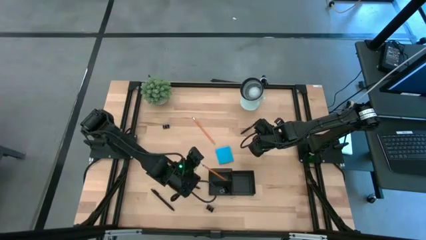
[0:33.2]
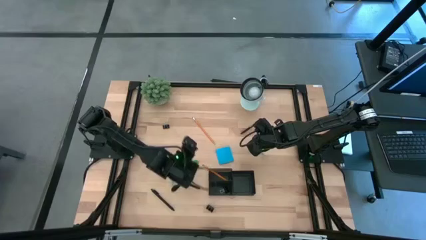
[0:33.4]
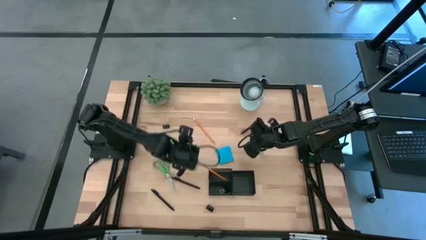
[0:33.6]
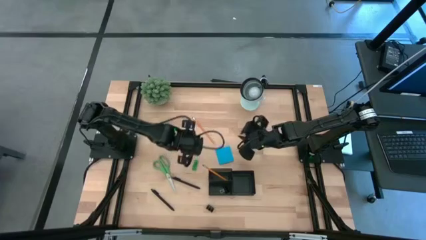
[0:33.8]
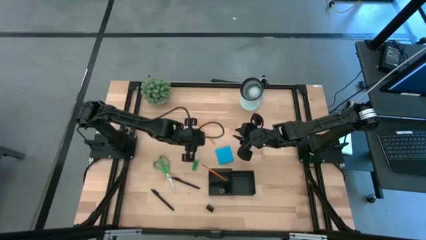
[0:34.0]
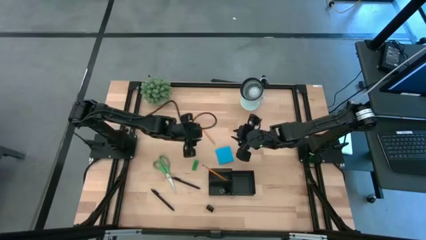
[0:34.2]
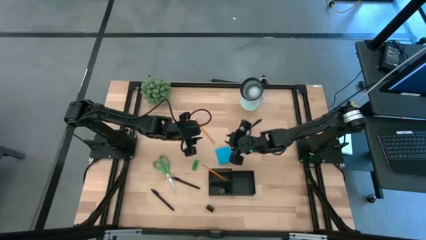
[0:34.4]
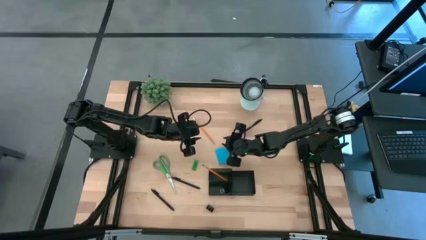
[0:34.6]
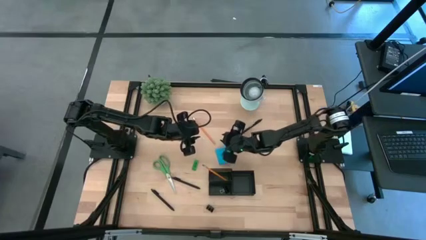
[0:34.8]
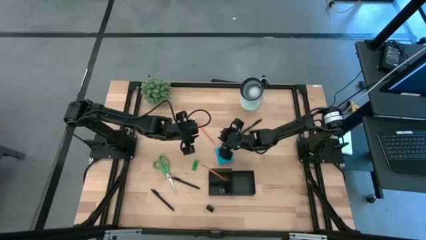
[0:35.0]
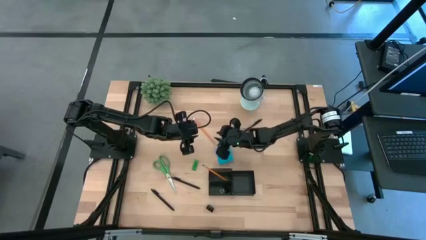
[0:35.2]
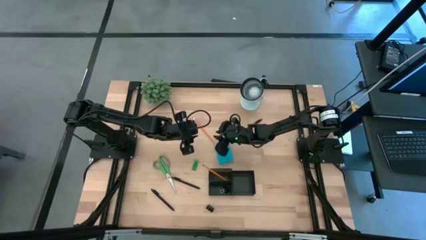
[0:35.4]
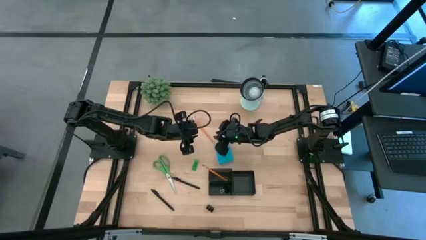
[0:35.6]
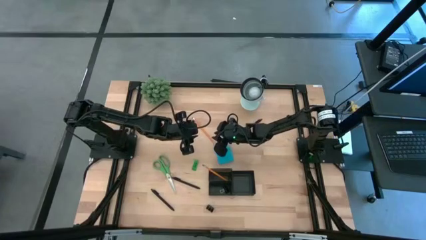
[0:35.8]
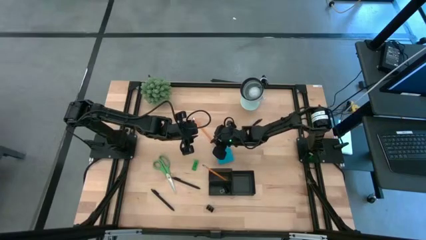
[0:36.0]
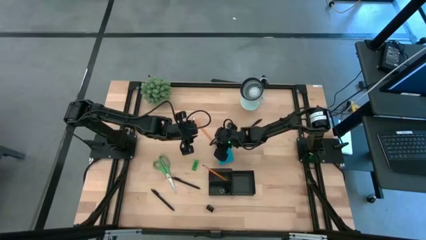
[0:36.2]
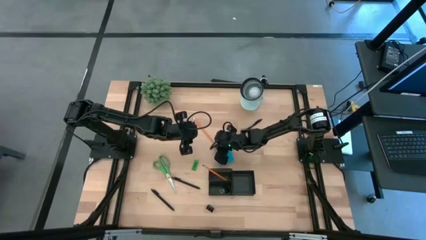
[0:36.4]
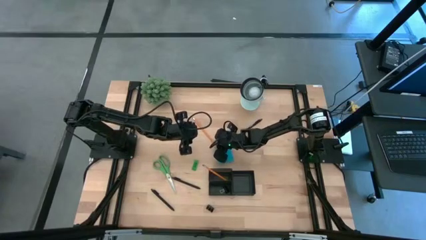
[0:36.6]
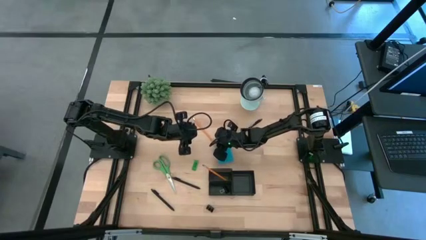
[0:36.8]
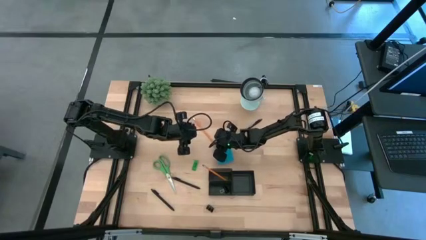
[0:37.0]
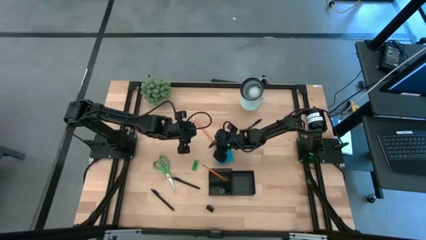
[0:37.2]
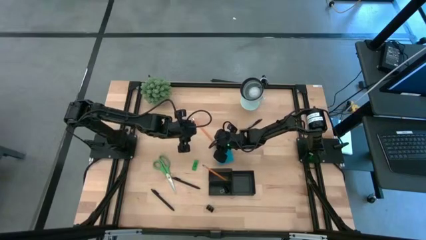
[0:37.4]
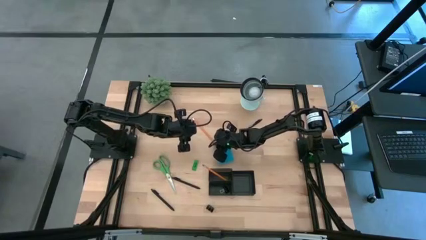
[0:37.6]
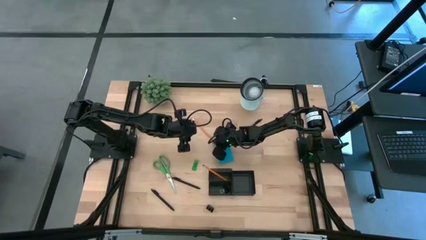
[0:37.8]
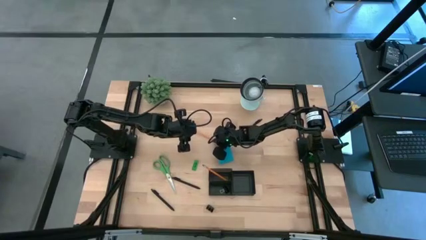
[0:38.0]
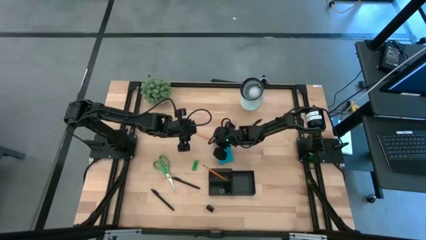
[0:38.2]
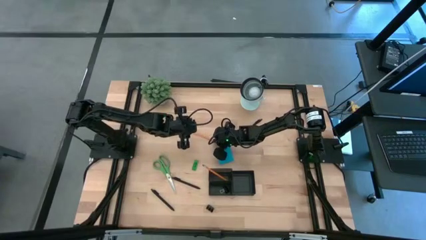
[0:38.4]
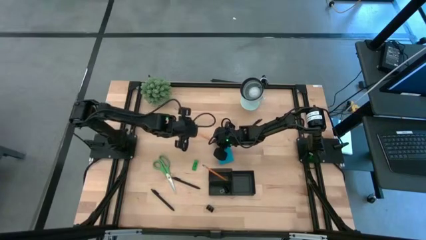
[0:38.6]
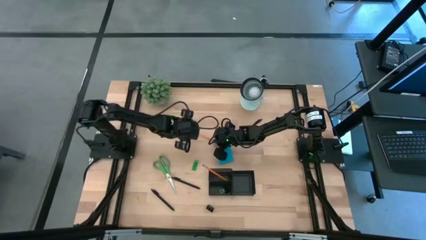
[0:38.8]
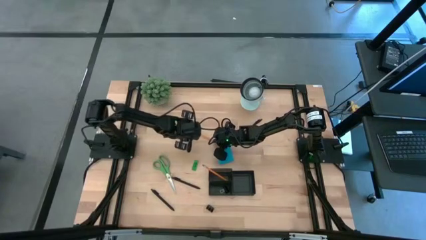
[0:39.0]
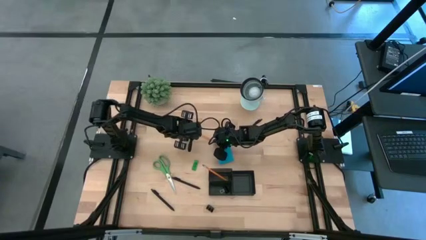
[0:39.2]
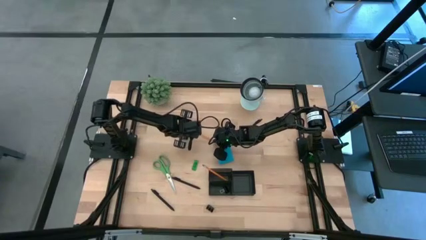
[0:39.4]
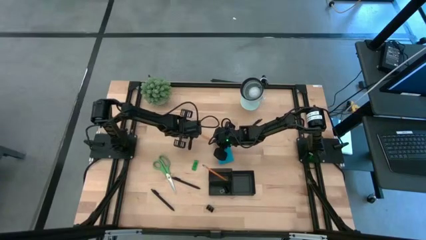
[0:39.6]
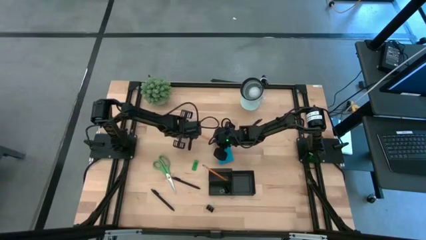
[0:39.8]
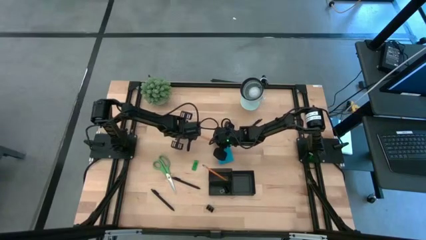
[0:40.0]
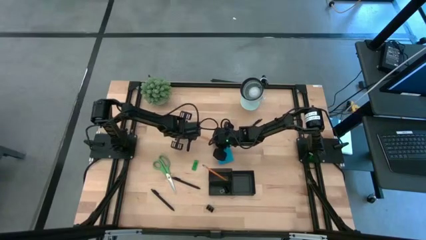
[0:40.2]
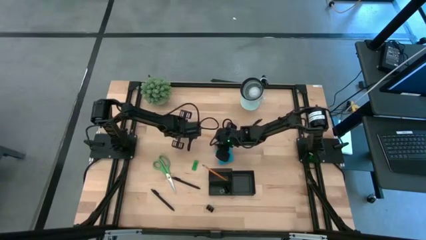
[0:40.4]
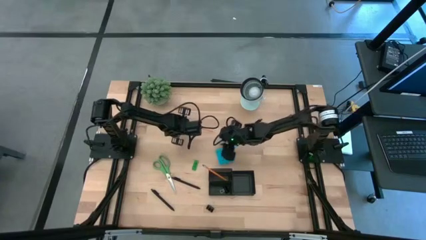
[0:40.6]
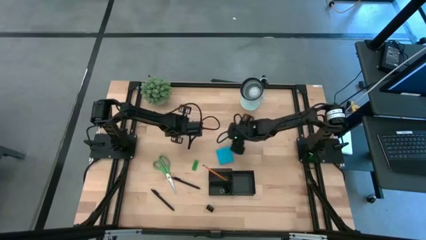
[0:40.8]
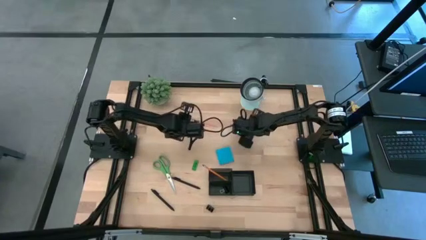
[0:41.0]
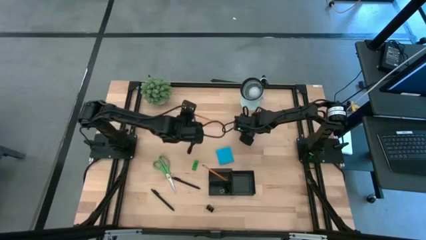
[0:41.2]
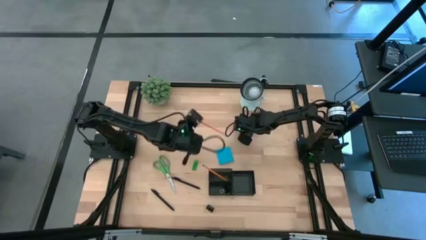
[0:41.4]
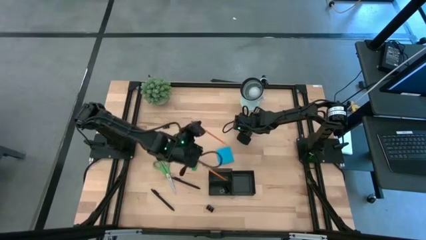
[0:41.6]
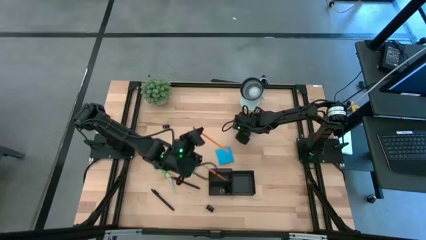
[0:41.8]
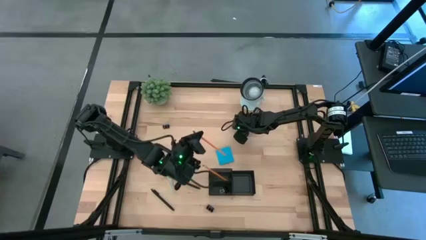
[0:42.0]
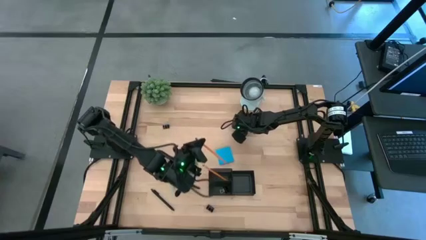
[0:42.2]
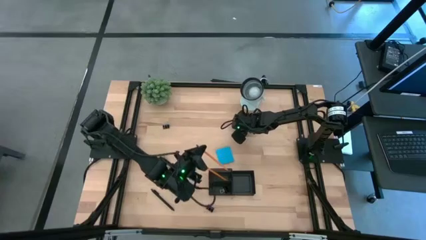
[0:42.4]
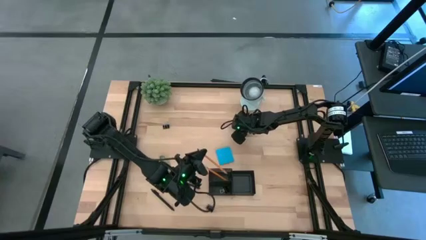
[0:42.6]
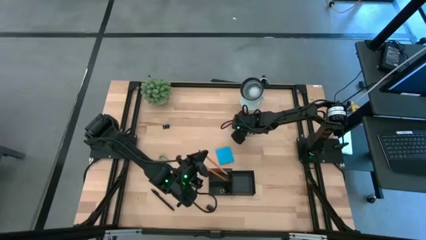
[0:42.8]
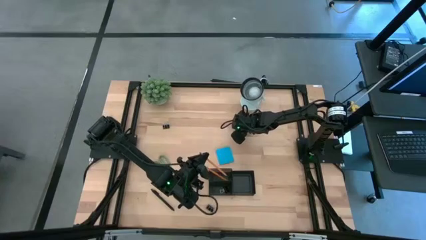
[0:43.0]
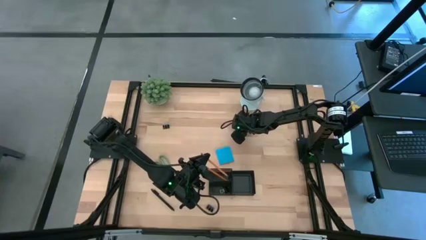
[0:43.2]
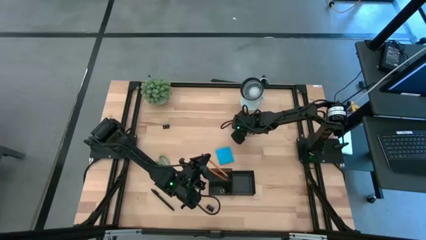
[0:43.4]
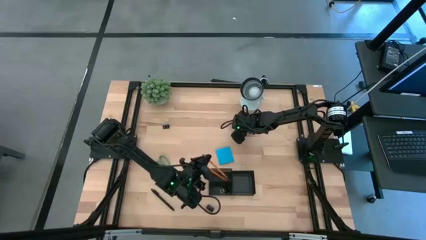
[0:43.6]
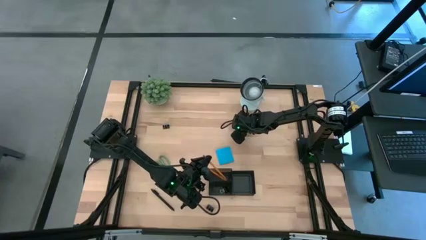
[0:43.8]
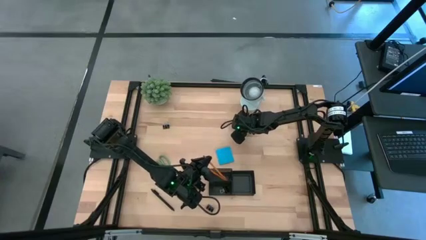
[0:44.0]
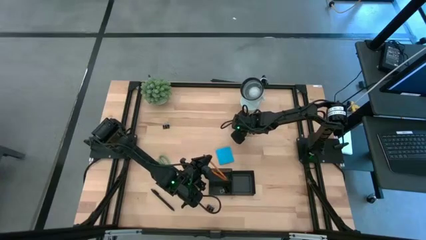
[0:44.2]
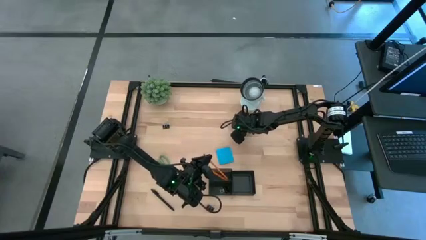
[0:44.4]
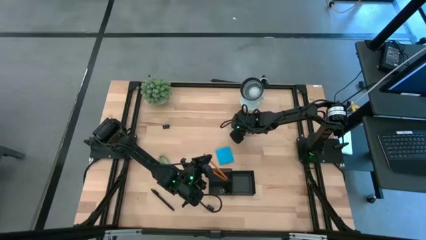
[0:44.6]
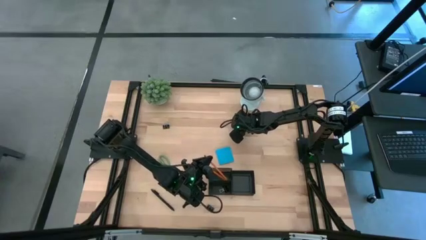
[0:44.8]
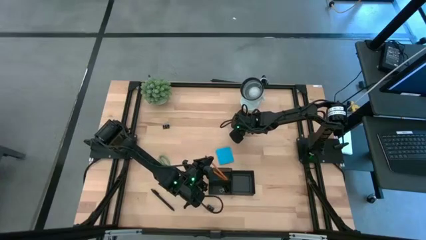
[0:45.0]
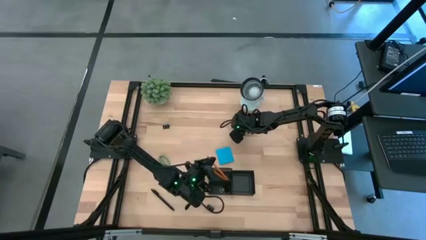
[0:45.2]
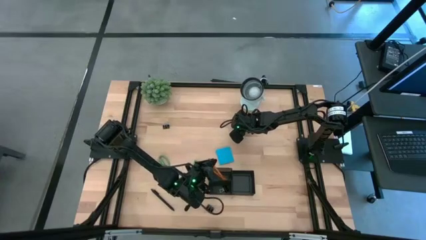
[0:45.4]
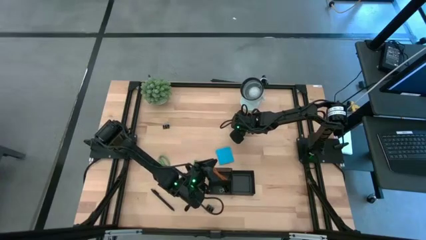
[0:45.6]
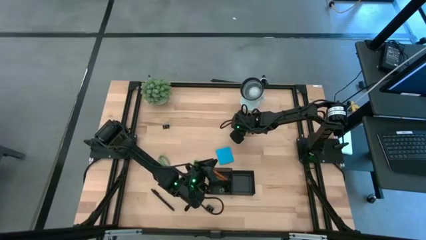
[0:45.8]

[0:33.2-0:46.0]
Task: Pick and place office supplies into organizer
Put the pencil into the top left slot of the desk organizer

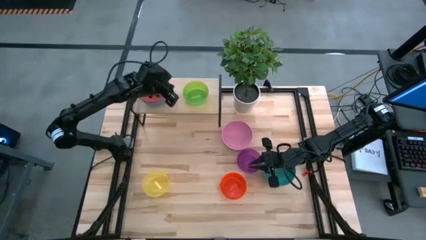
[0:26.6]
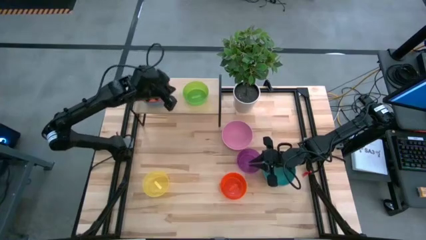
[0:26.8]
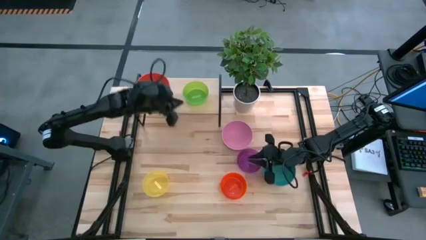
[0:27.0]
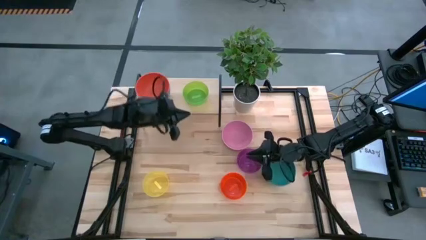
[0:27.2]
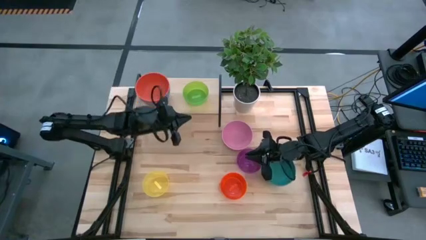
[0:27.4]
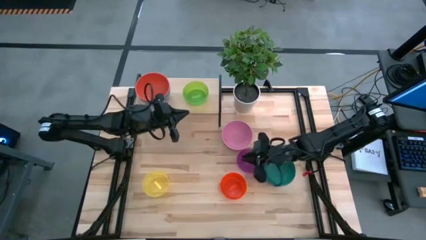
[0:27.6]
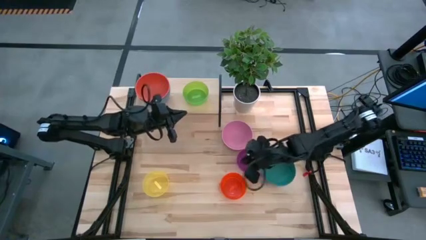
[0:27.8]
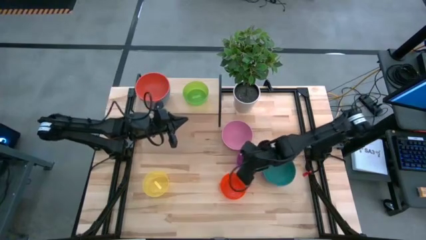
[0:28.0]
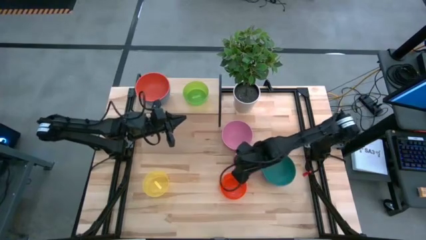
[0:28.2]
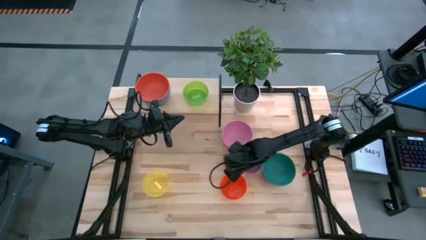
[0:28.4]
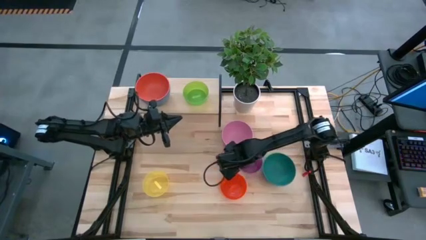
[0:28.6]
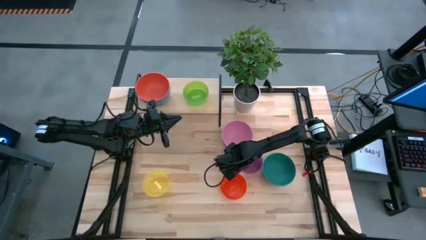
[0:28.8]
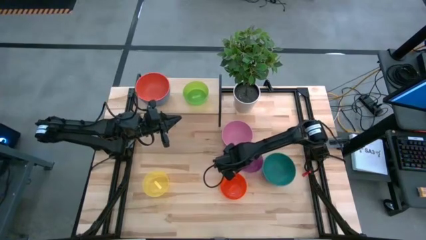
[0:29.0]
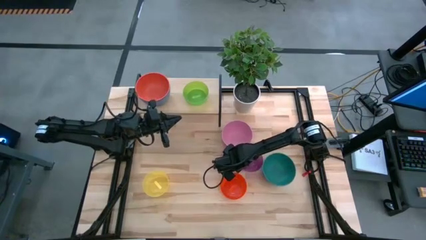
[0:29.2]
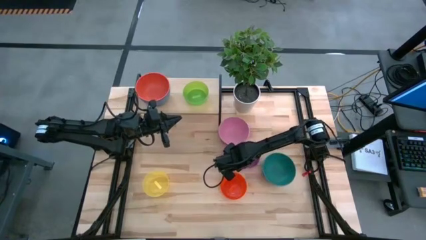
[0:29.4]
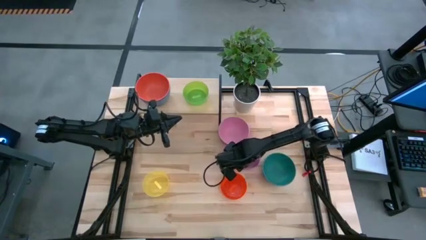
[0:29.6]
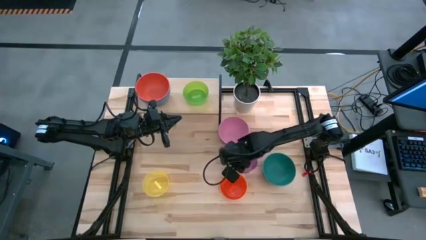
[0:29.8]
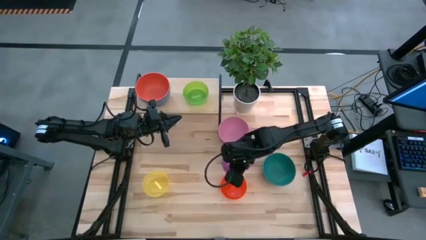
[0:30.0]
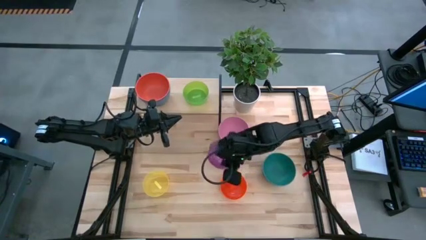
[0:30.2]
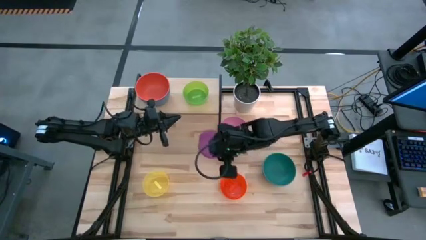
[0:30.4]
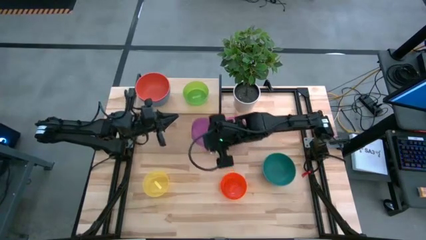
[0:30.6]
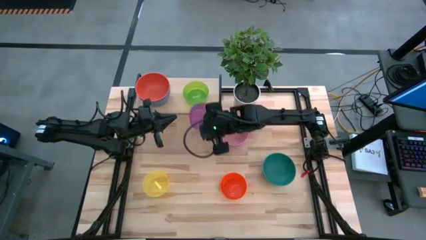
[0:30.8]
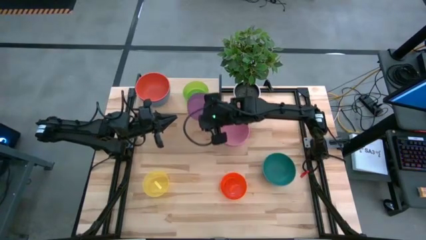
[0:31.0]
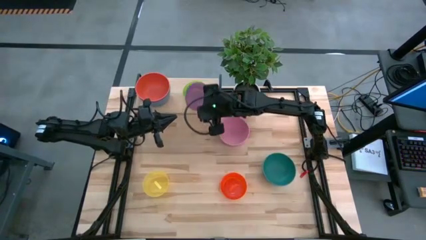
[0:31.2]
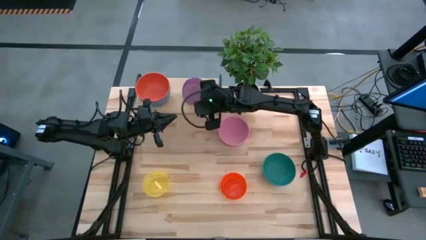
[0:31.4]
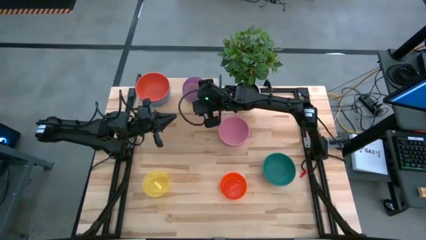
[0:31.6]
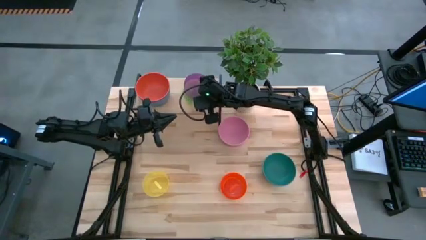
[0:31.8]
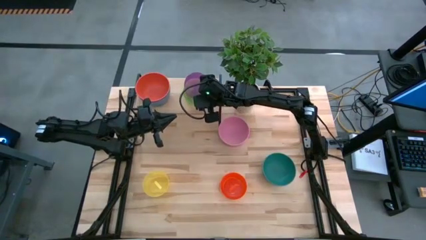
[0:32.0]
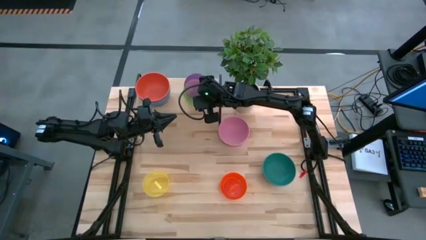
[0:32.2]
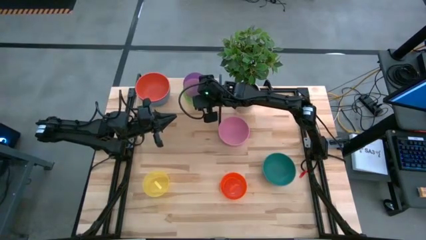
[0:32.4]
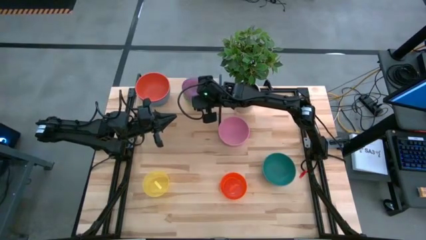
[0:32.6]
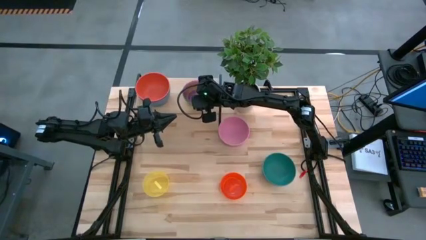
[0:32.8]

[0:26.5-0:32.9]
Task: Place and stack bowls onto a shelf
Stack the transparent violet bowl on top of the transparent green bowl on the shelf
